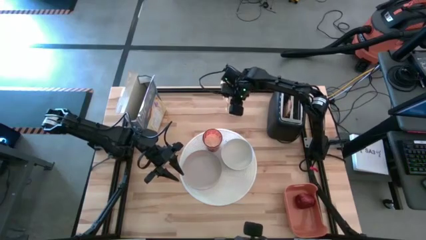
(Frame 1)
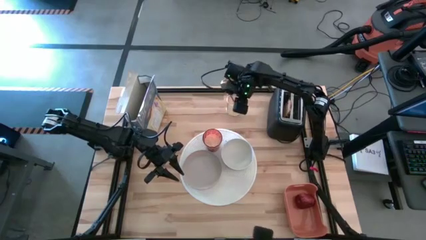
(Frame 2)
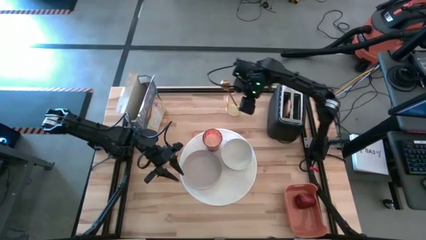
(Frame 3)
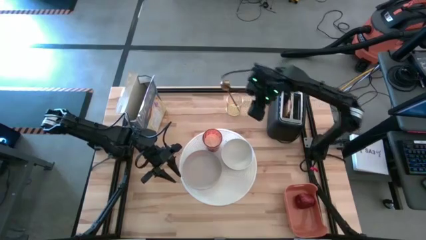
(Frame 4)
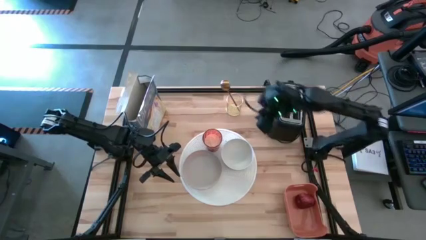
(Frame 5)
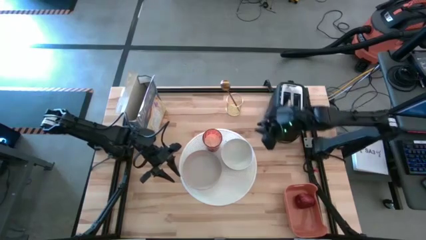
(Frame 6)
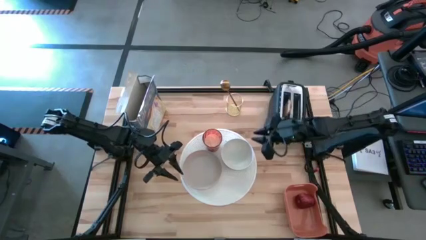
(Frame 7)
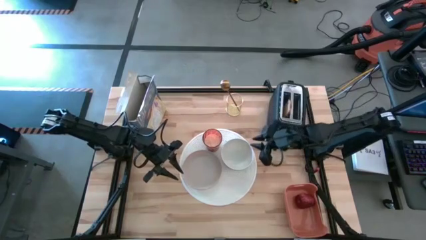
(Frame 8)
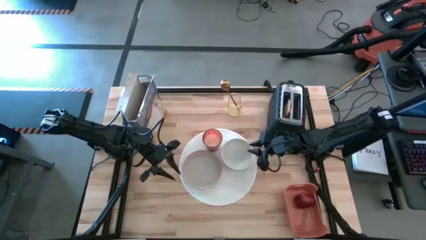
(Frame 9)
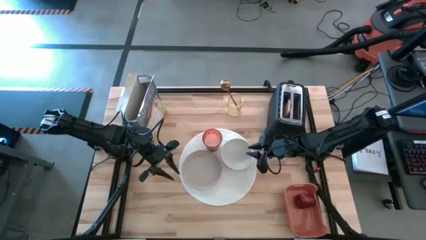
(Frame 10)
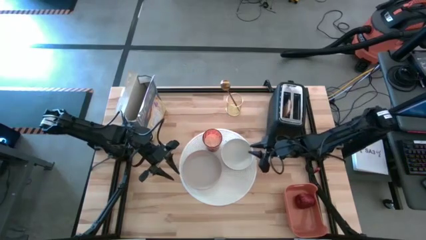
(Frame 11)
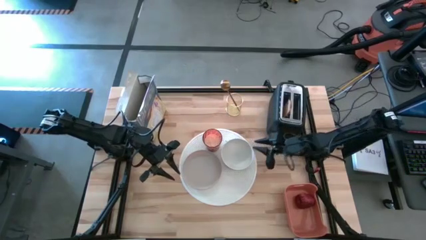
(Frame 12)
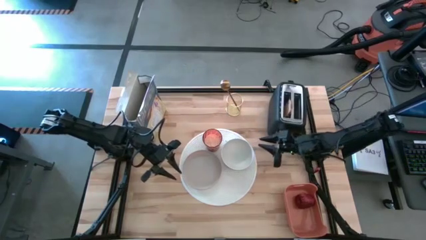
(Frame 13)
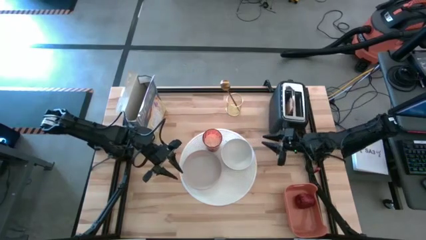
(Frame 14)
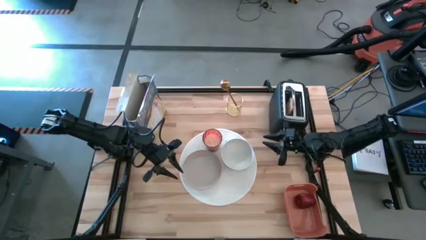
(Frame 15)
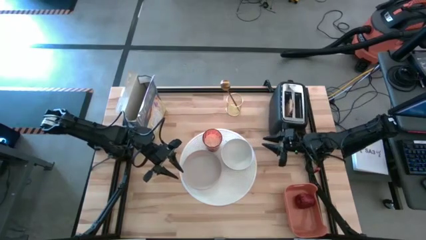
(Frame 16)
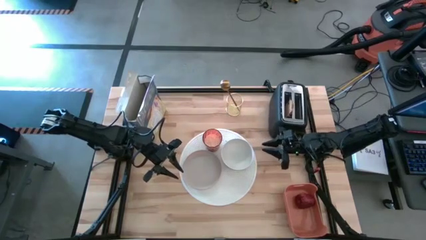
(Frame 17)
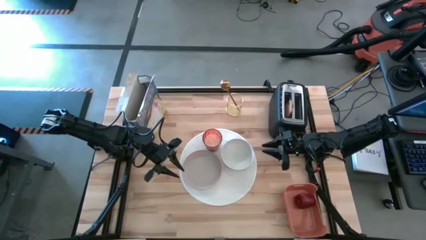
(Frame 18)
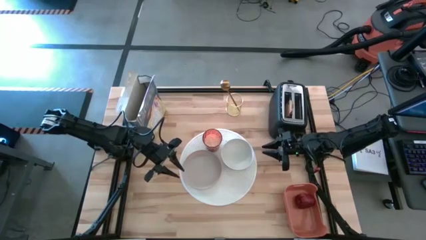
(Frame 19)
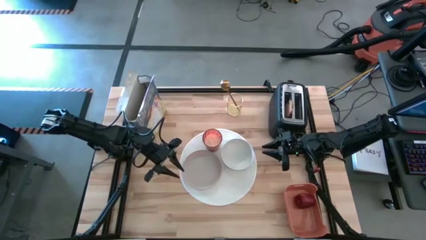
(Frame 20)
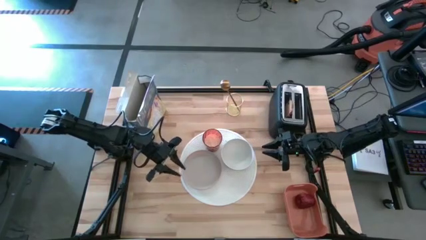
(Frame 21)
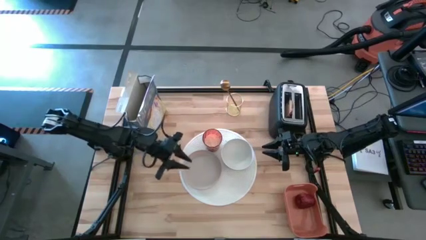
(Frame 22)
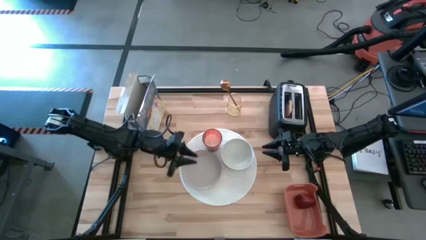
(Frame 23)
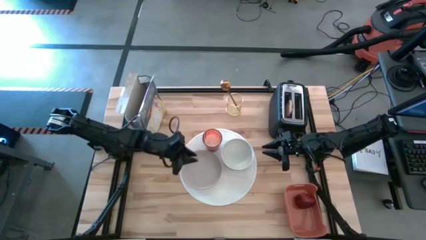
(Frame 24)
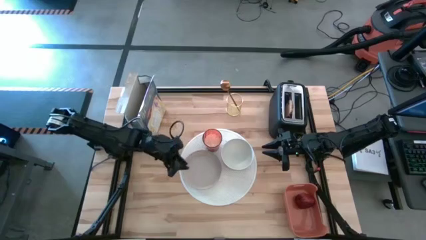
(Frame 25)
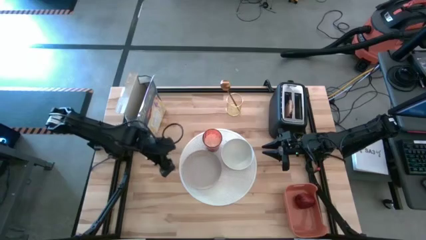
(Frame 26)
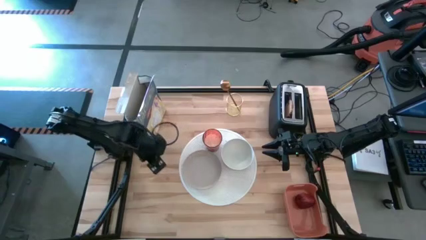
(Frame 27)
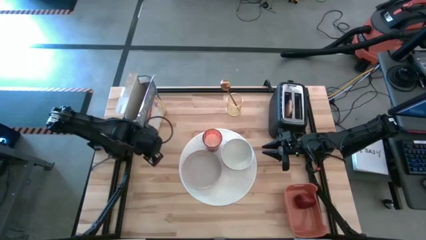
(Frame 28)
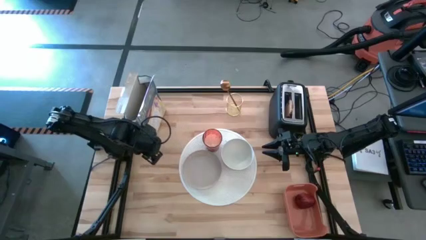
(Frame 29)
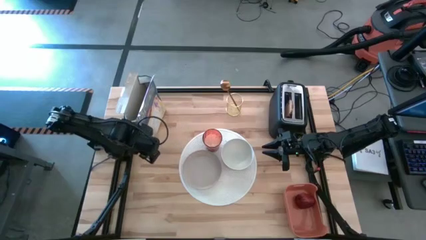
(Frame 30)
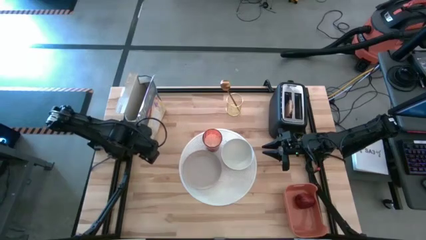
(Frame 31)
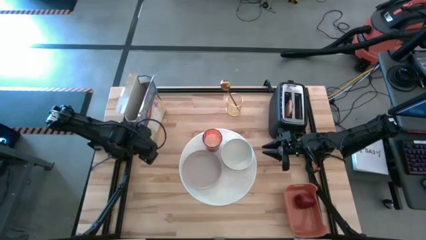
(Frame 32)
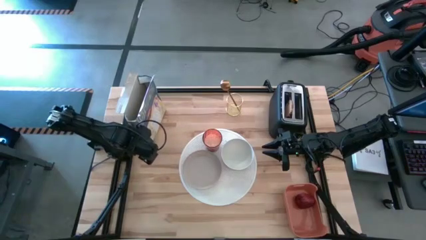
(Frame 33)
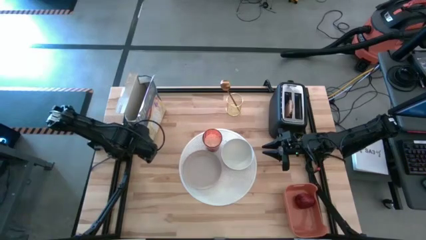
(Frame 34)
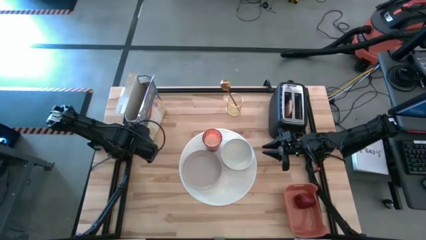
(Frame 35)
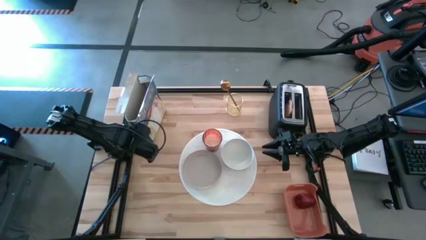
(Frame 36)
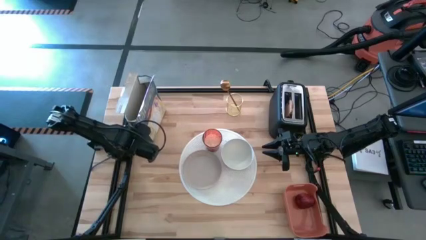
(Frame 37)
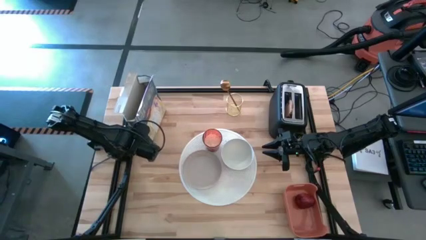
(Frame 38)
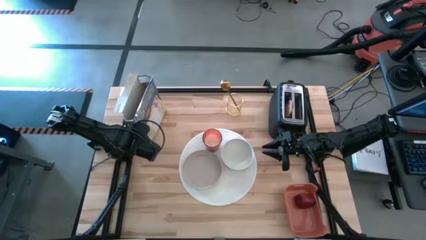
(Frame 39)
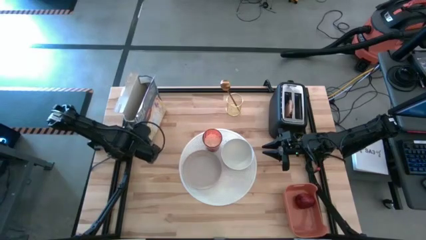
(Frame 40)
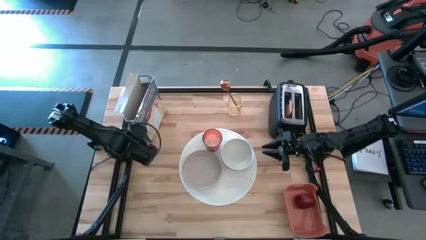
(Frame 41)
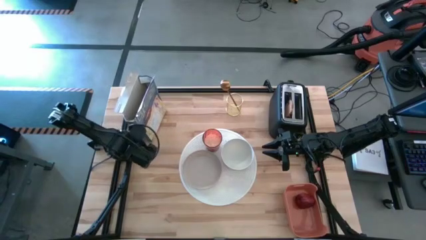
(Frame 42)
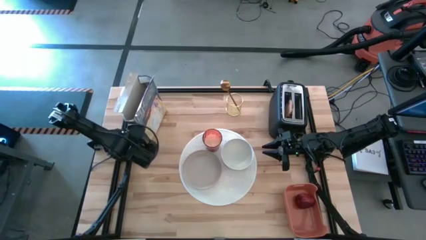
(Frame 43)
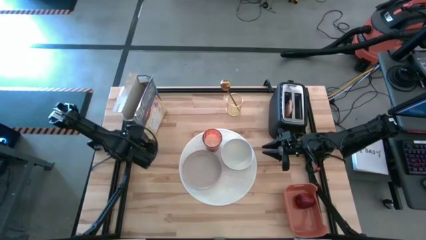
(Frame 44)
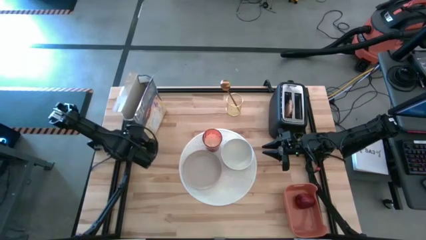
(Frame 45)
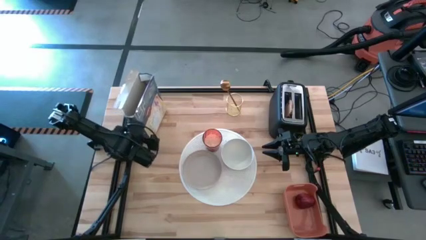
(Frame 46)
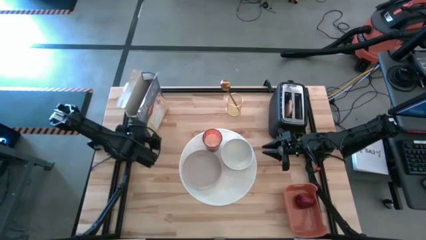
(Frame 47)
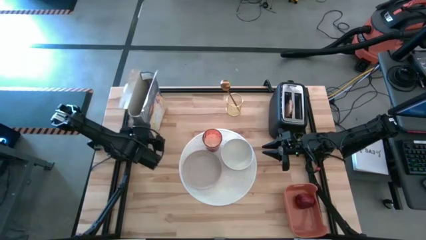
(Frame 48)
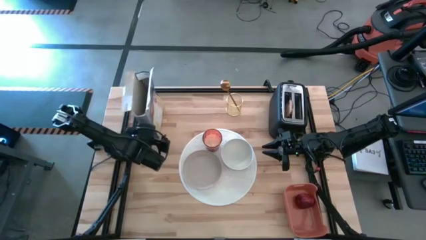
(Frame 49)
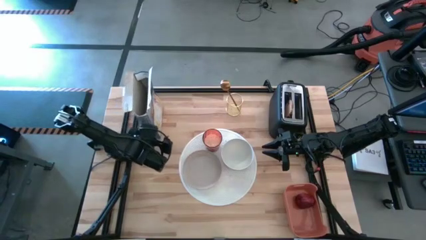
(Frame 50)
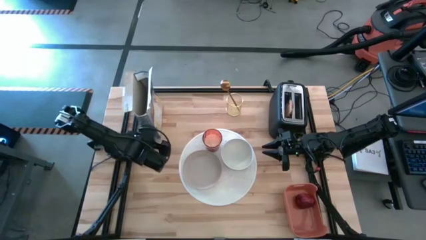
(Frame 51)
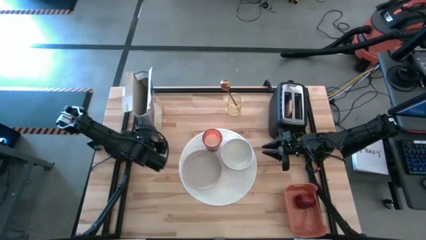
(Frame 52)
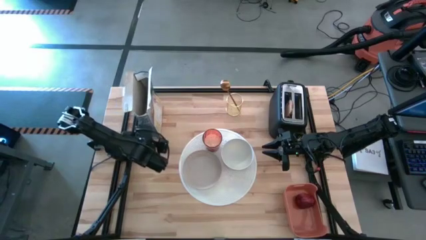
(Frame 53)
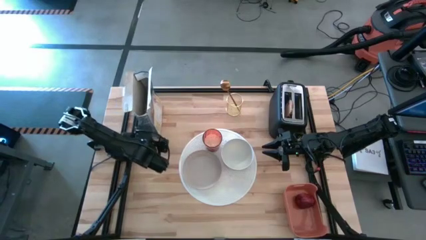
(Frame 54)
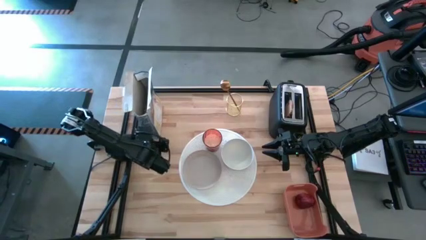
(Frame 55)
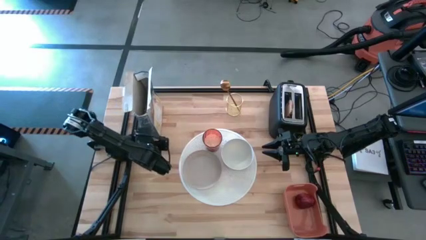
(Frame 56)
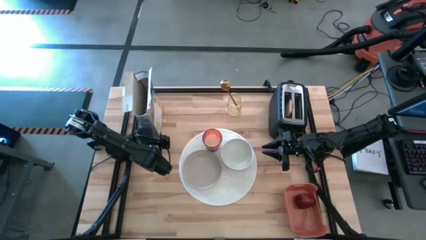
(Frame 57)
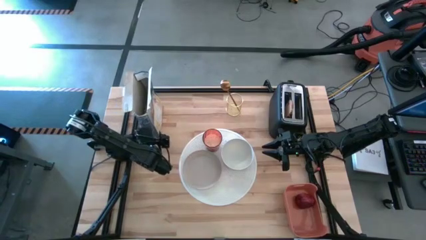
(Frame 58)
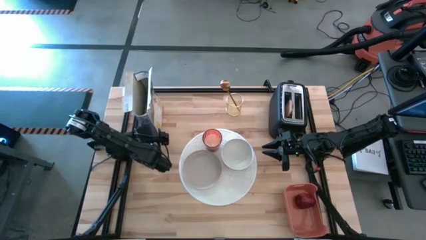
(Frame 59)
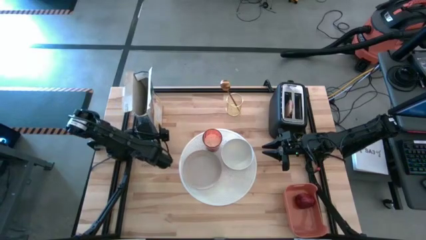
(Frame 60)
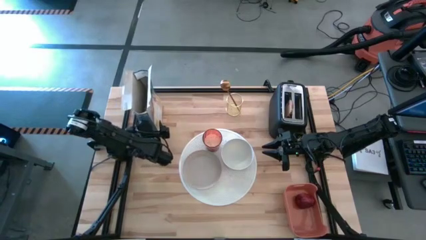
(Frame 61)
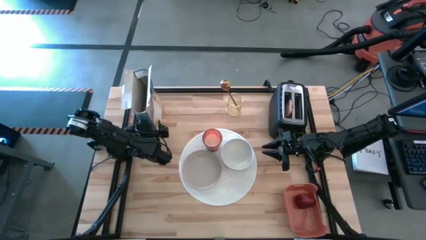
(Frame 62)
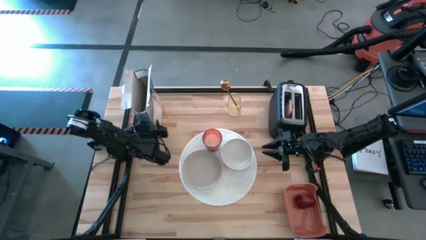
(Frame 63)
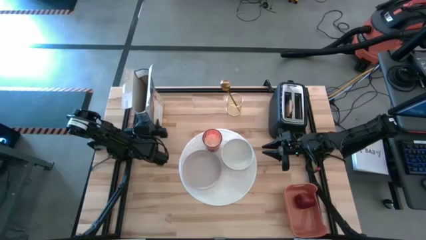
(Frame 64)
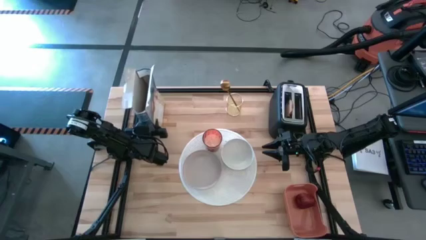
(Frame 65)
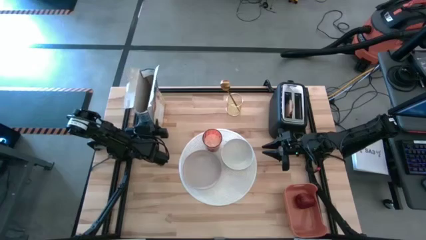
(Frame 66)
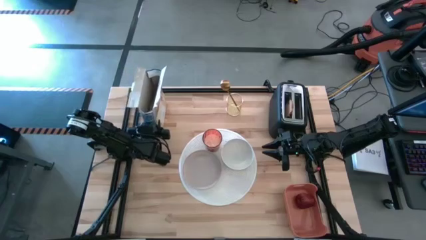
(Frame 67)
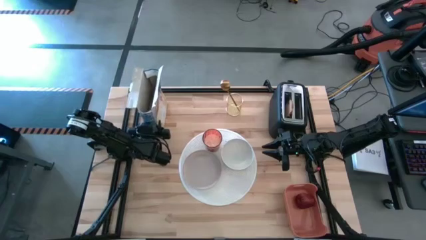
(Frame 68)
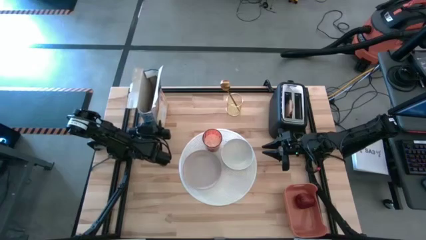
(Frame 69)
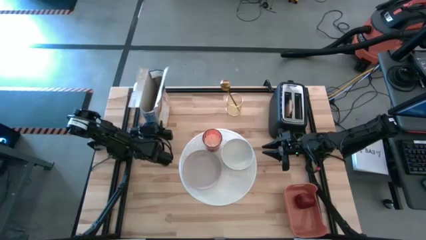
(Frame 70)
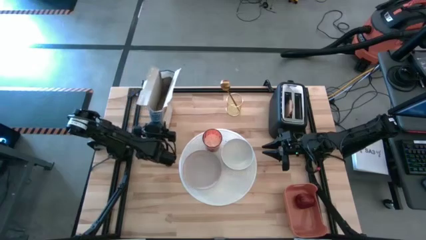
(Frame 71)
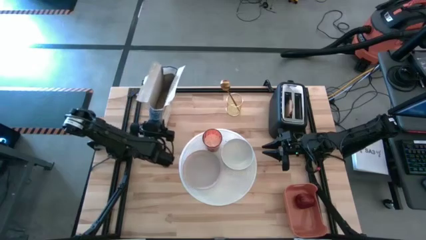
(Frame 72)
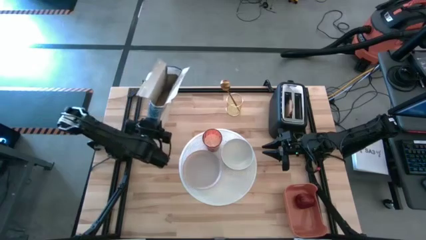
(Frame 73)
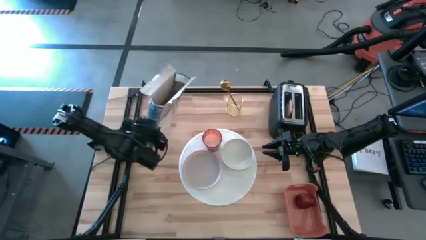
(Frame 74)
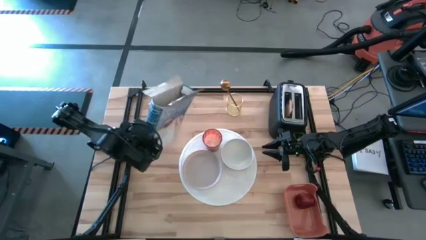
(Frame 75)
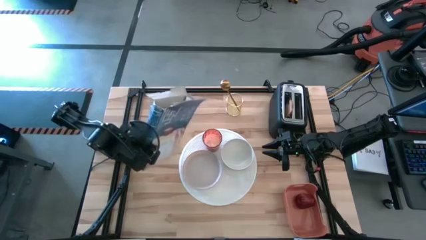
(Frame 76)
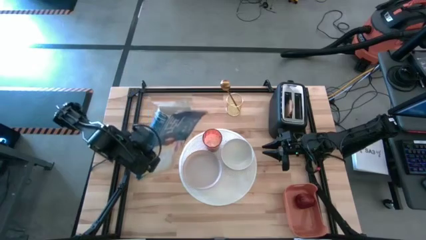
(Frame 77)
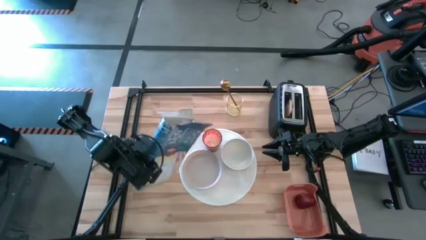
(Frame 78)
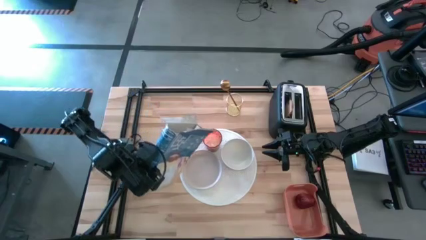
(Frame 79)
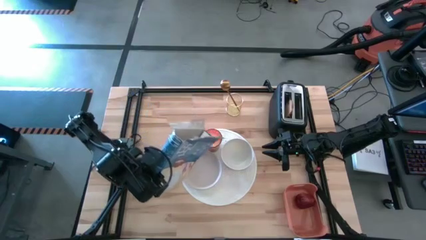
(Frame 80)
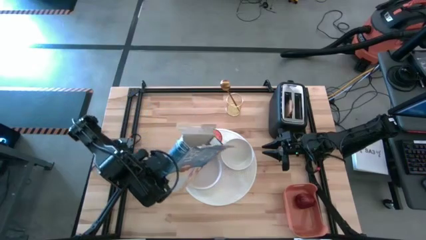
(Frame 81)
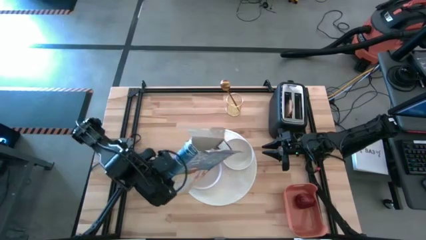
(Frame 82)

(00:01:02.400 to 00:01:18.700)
Task: Arrange a breakfast setting
Pour the cereal from the cereal box into the white bowl
